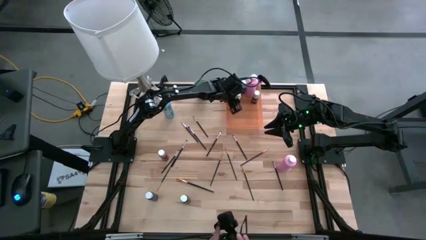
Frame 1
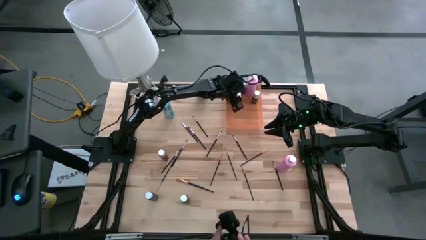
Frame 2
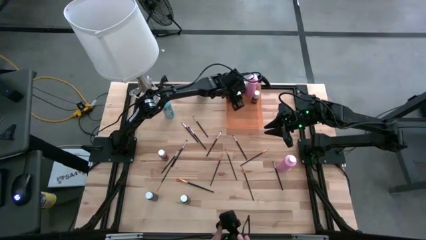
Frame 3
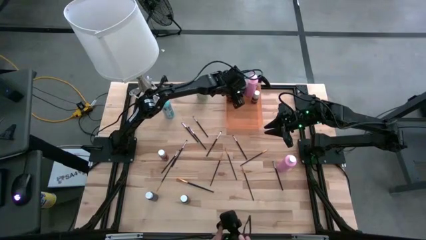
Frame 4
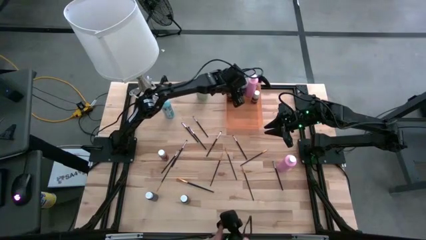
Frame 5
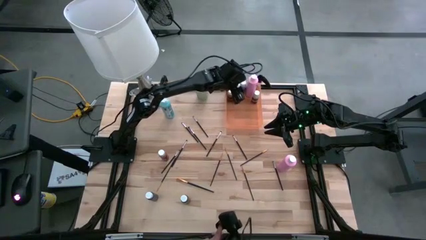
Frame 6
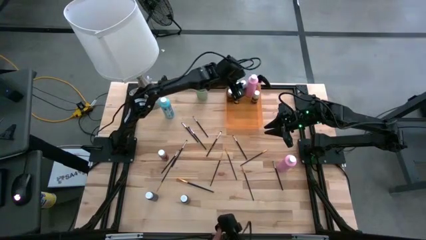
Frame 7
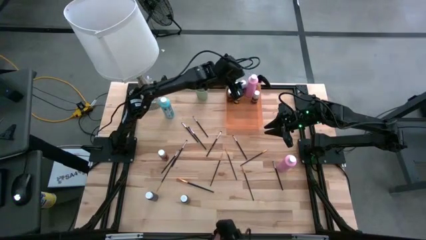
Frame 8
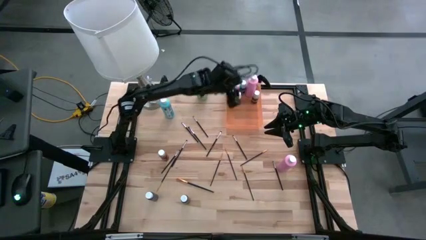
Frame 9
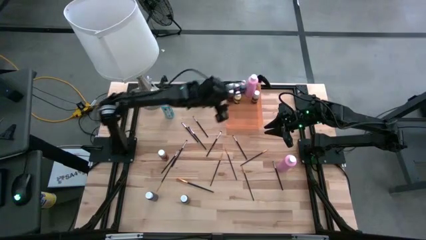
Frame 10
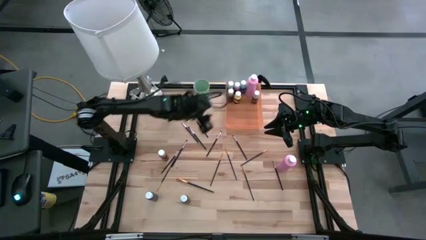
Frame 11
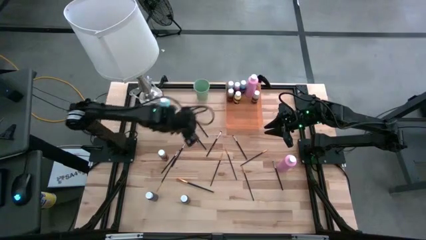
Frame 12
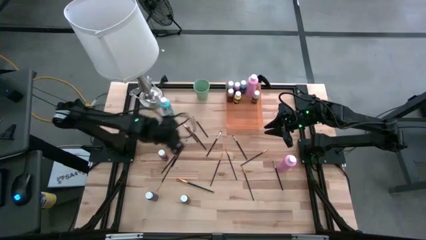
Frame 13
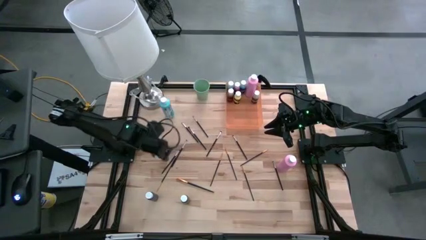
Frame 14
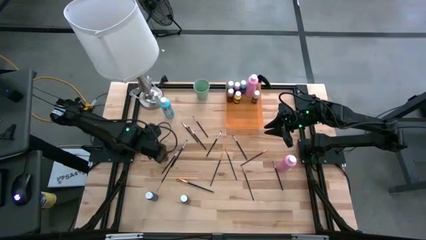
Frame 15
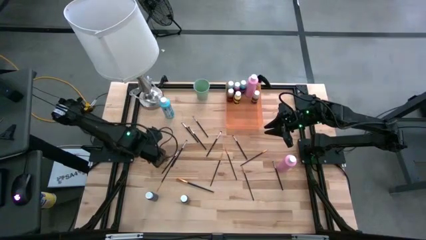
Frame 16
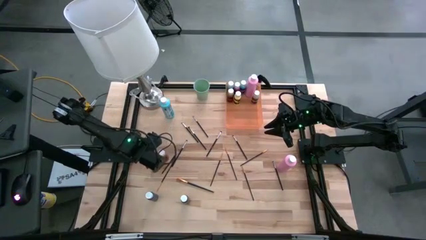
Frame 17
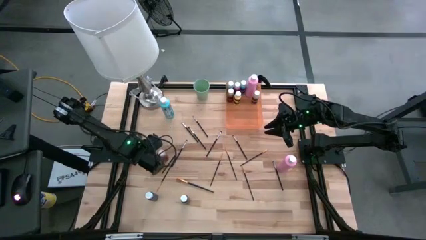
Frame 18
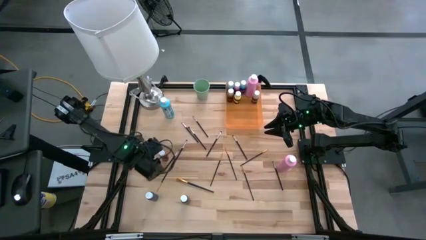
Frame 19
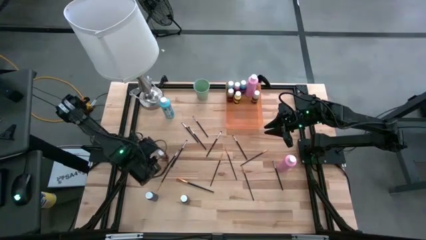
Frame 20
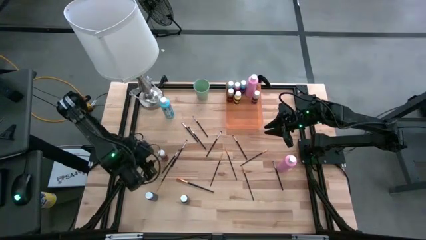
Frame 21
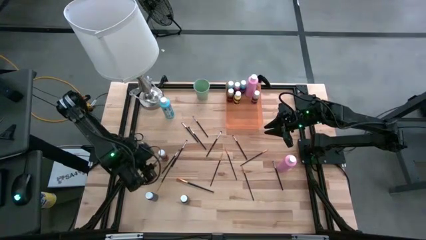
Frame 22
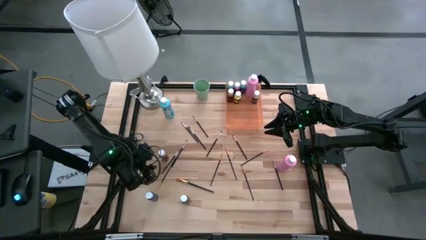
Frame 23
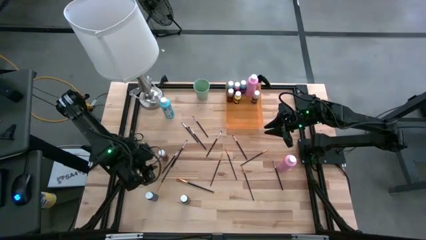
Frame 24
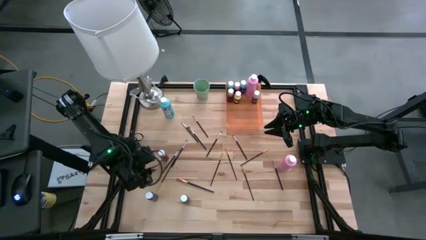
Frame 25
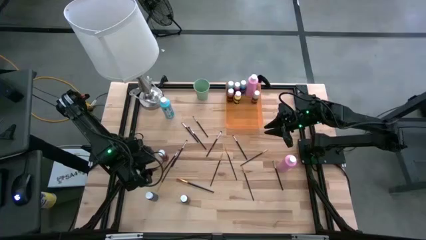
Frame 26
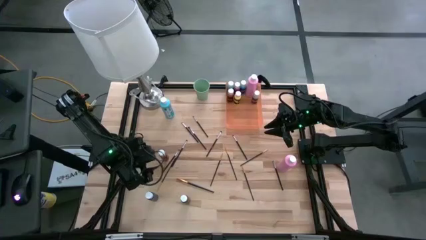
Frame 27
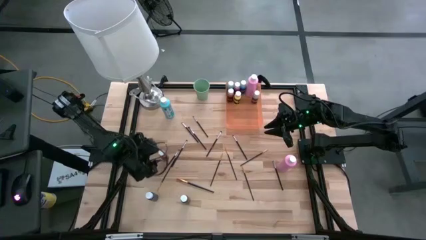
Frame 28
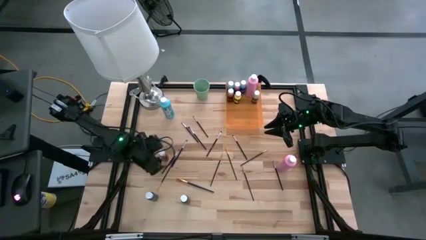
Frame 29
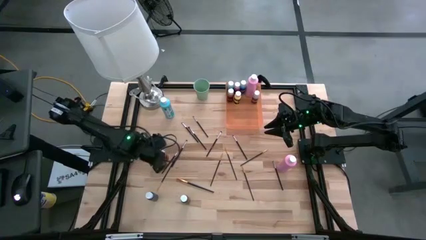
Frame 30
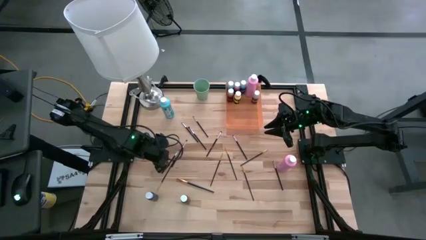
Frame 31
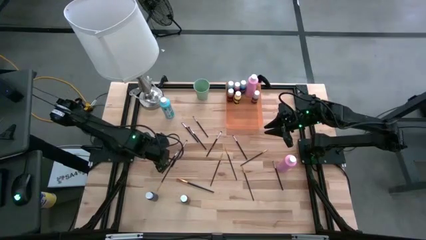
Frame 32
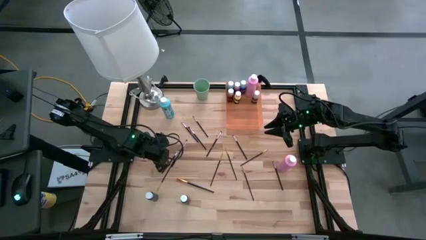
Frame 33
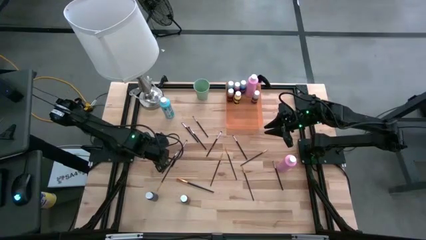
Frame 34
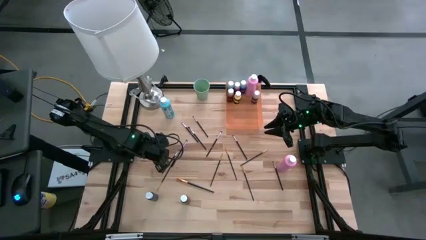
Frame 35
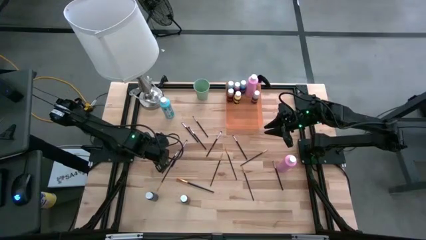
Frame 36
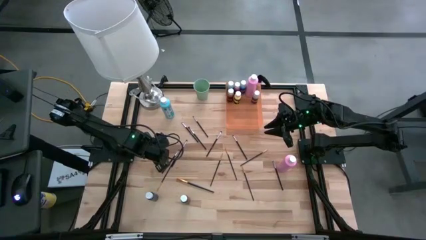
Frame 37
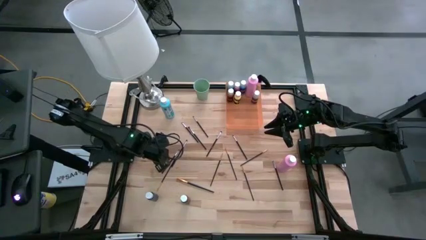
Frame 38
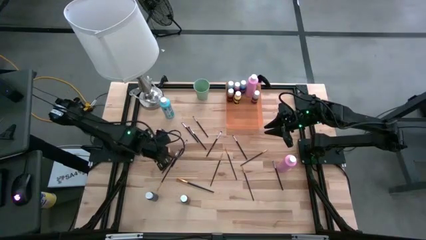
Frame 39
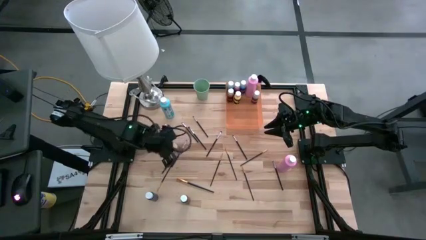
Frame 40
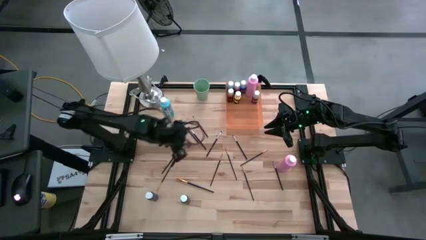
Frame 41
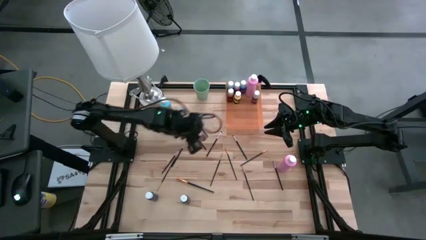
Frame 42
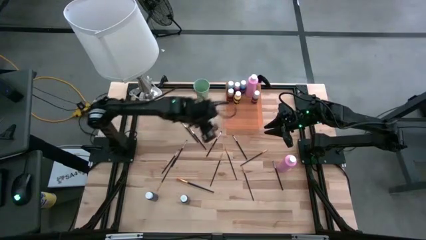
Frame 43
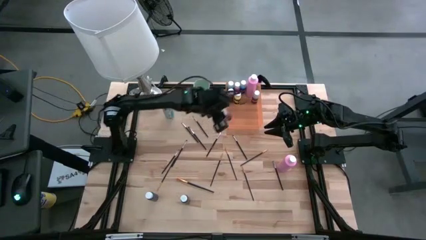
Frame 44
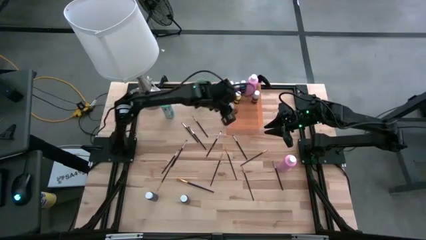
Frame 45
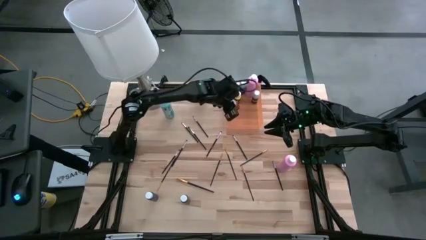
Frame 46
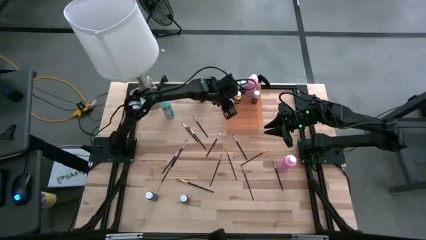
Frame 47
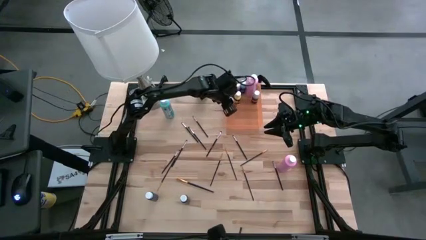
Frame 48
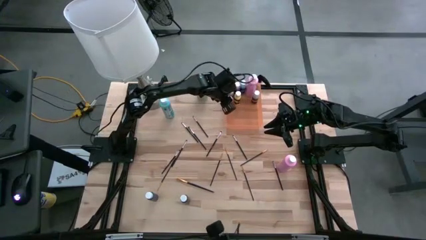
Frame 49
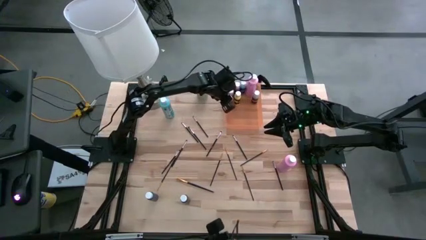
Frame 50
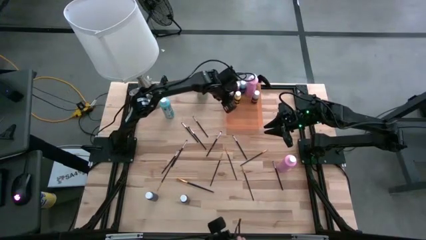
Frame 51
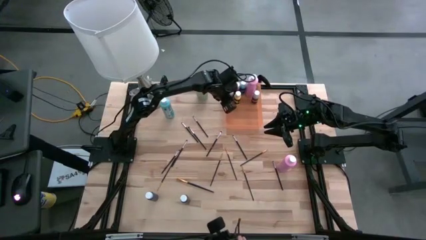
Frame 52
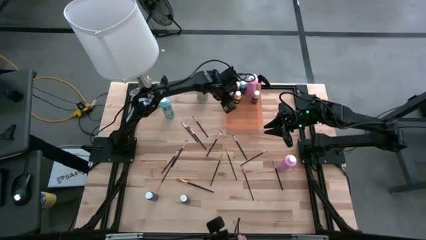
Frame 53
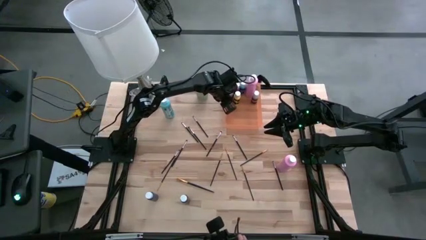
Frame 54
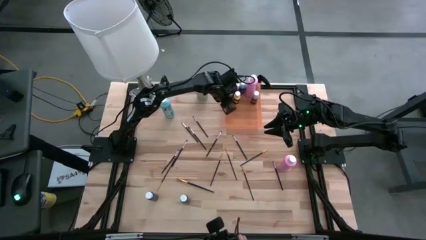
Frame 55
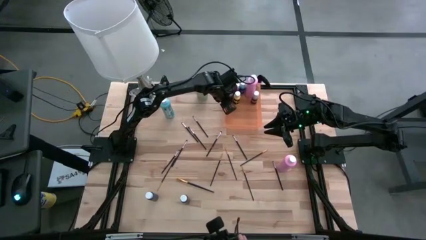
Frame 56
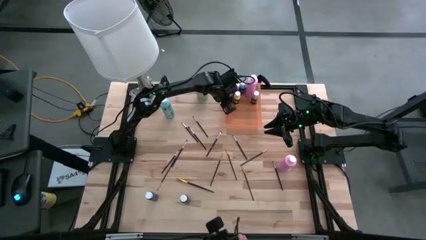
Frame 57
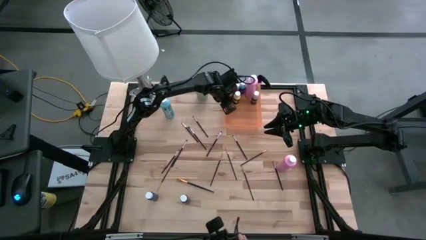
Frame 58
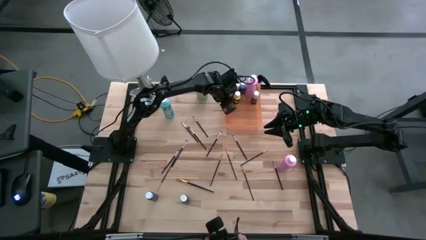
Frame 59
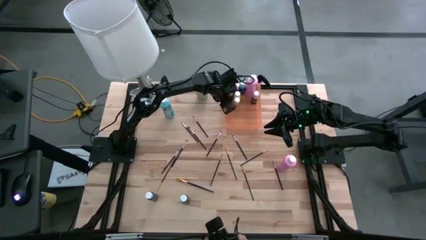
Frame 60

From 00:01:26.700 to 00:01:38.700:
Task: Pick & Place Paint Supplies
Put the brown paint bottle into the orange bin
